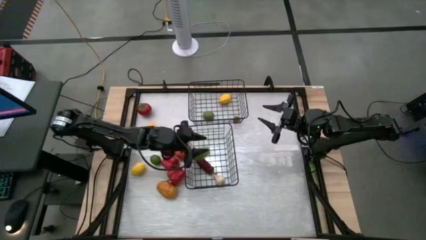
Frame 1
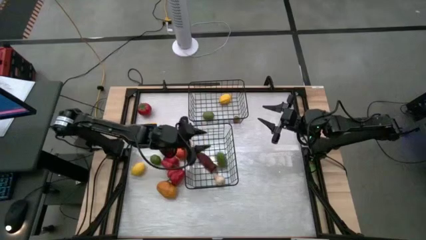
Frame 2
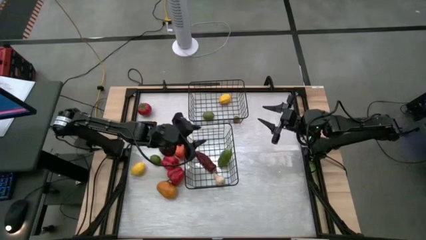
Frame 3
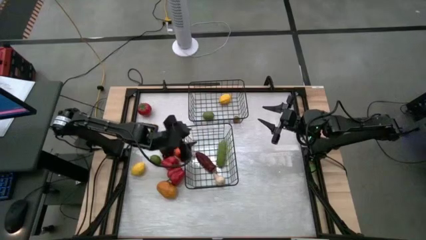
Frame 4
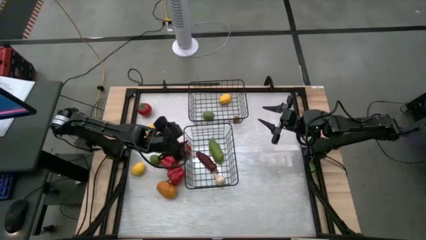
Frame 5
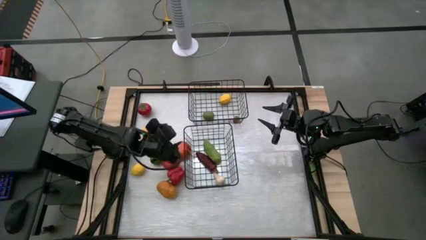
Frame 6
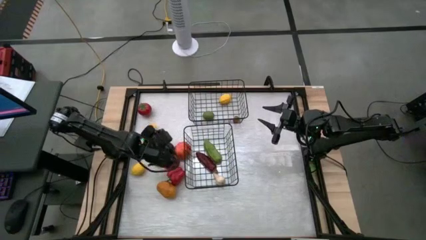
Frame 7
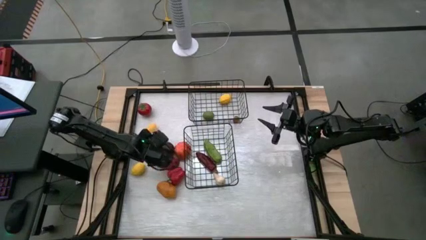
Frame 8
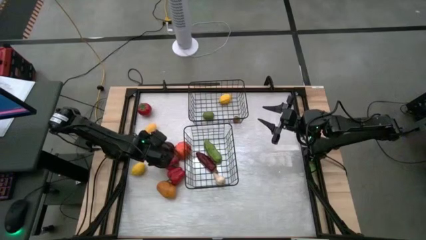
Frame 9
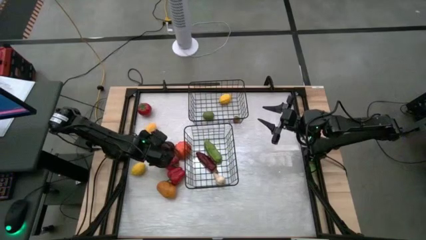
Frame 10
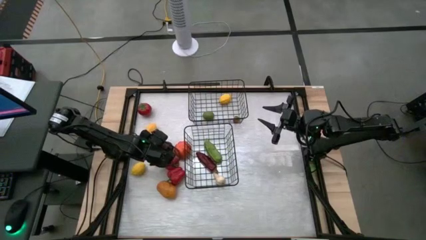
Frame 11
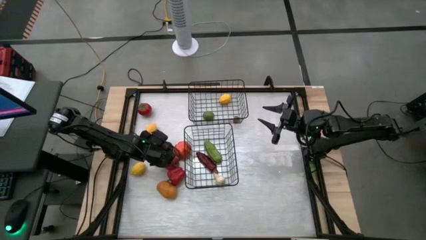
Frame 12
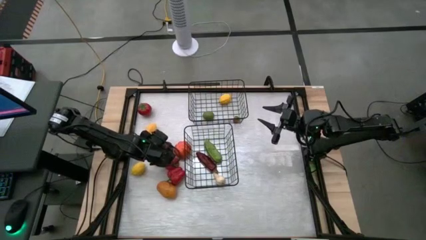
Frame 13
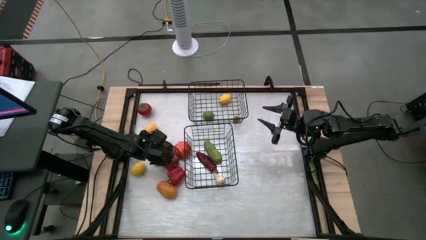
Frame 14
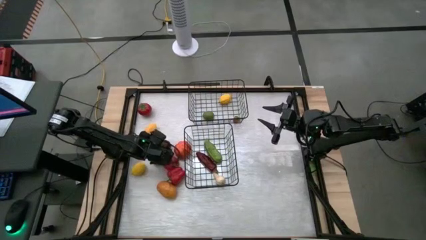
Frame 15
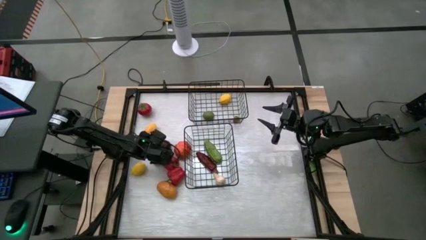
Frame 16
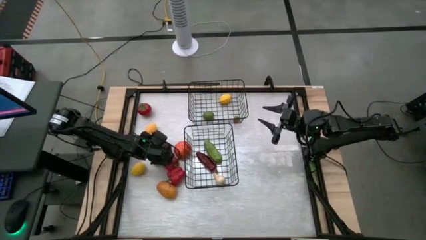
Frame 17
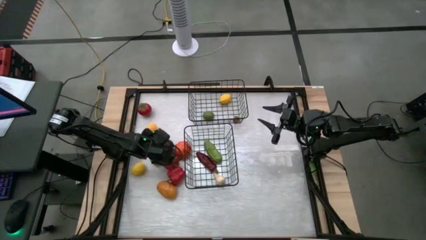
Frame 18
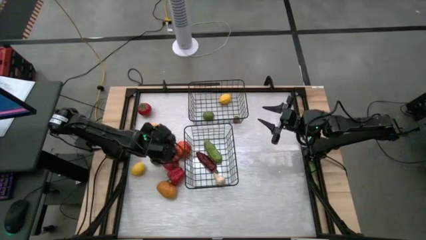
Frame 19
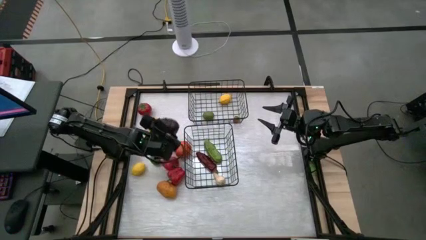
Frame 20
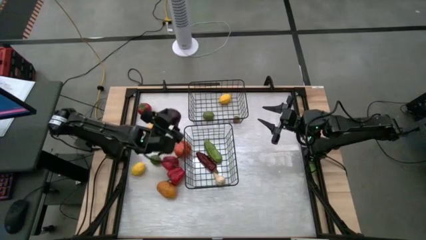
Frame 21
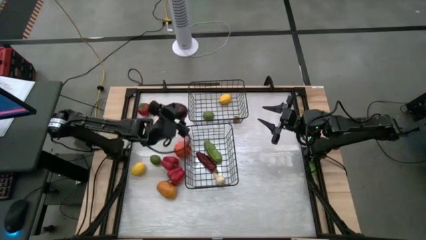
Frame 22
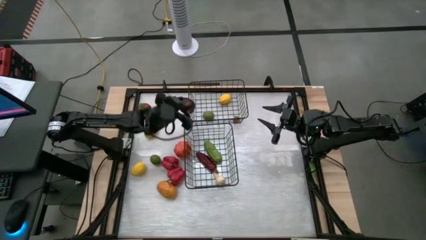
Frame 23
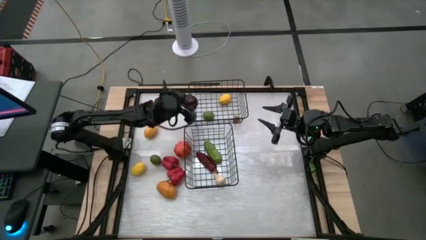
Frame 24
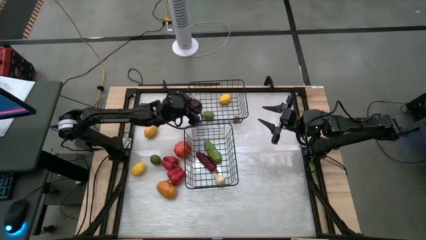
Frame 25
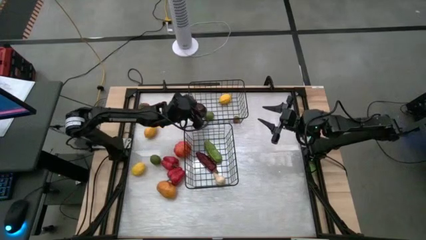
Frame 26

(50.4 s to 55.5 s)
Task: Sort produce into baskets
Put the red apple into the top wire basket

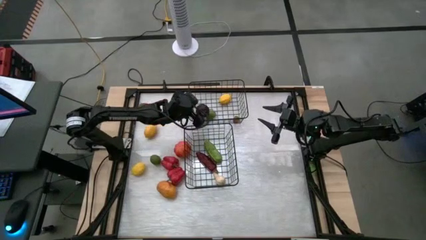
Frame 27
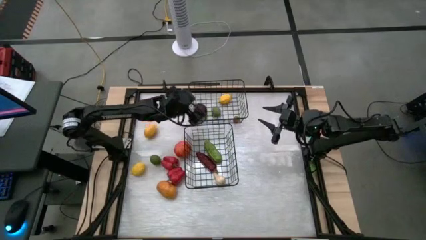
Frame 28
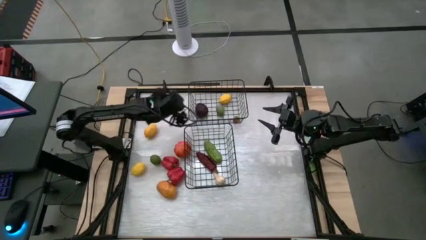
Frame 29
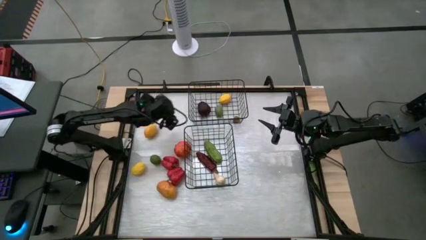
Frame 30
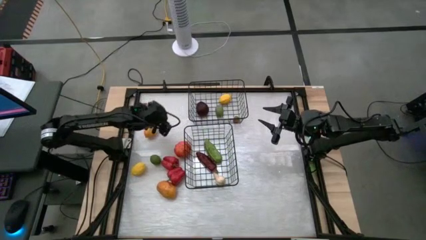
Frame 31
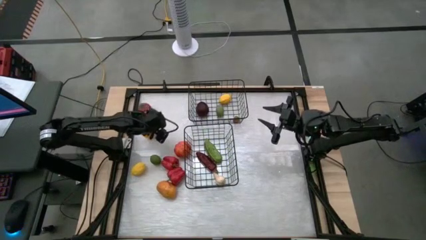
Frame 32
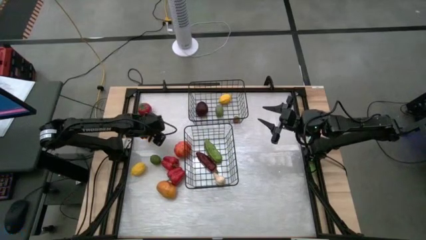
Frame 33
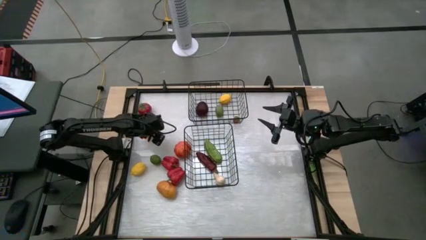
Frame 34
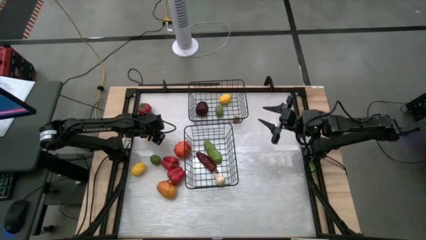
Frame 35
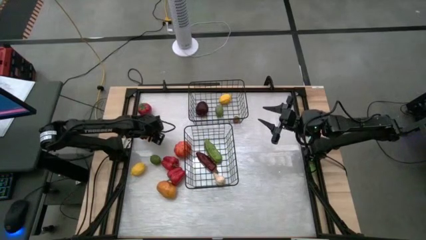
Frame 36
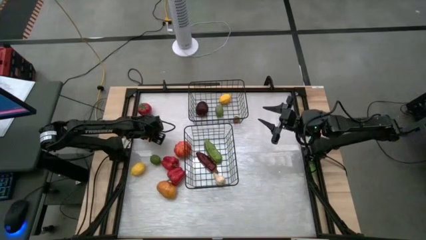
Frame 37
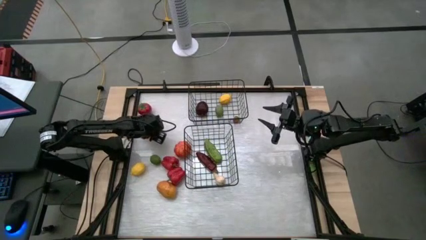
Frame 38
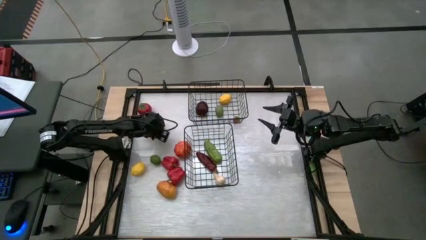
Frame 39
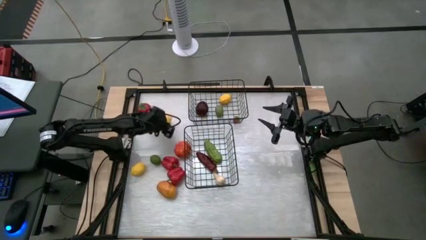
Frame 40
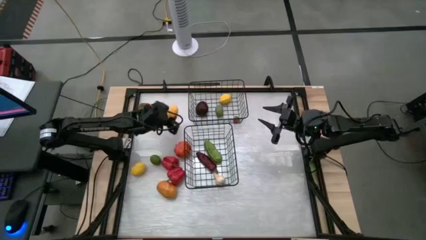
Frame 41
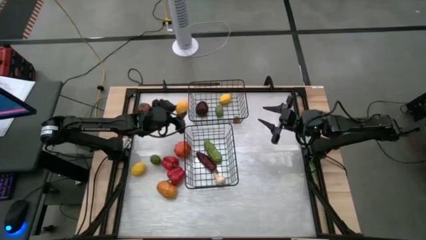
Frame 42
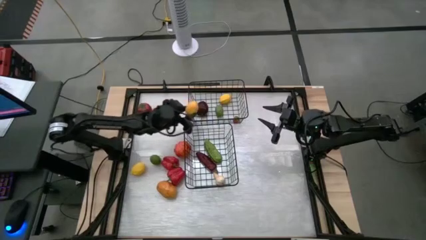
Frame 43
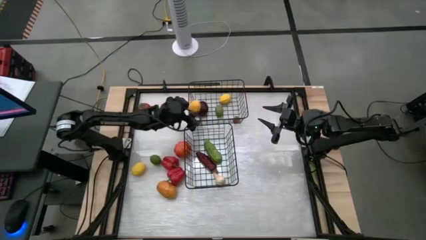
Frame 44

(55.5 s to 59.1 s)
Put the top yellow lemon into the top wire basket

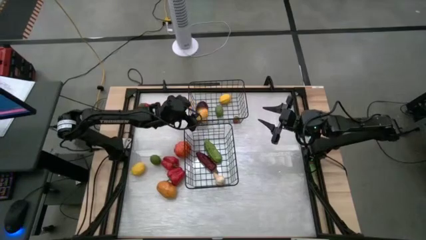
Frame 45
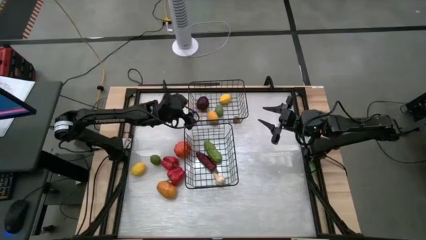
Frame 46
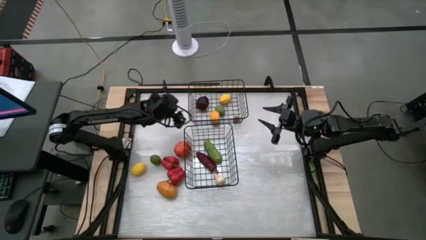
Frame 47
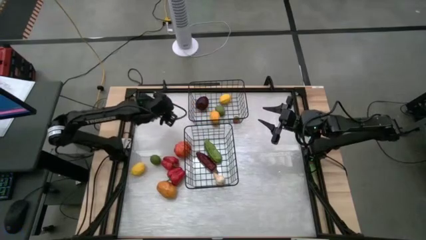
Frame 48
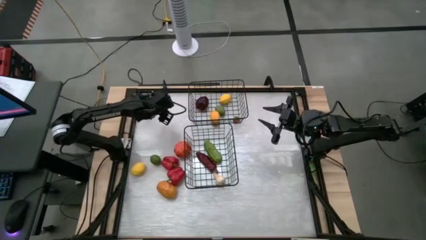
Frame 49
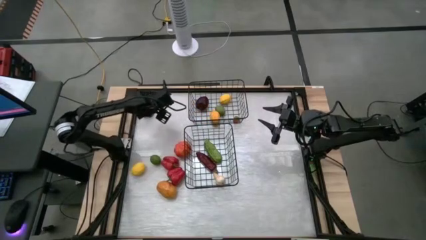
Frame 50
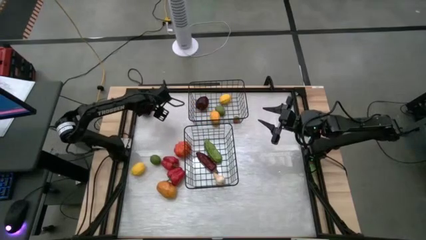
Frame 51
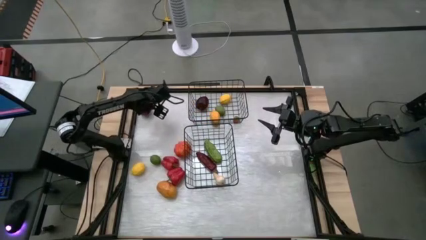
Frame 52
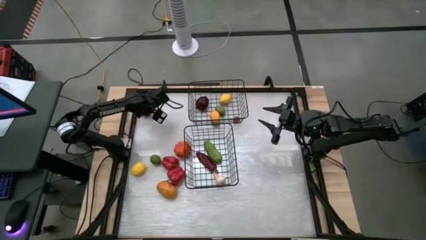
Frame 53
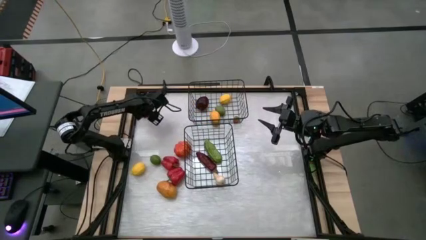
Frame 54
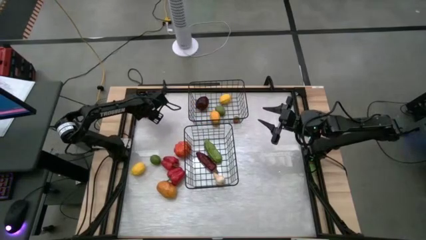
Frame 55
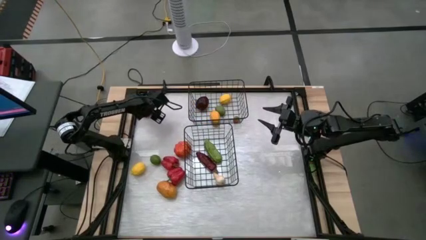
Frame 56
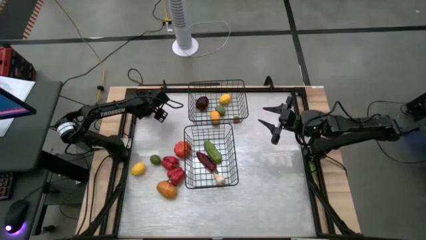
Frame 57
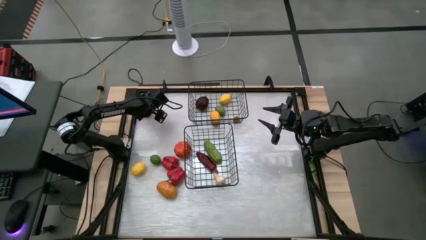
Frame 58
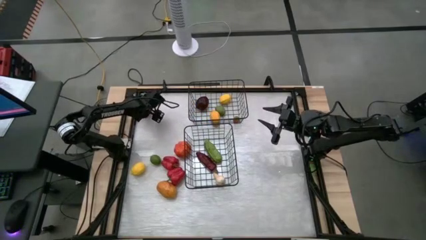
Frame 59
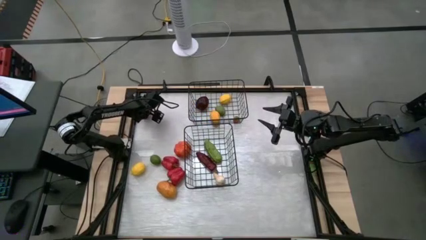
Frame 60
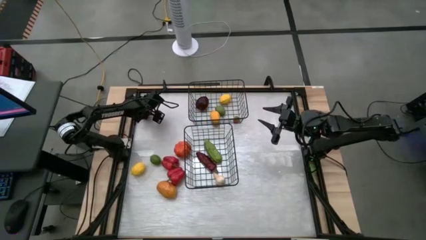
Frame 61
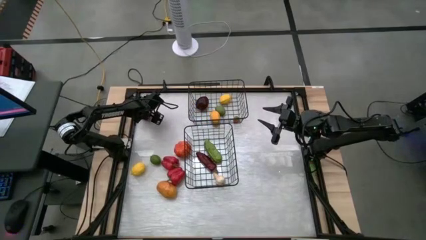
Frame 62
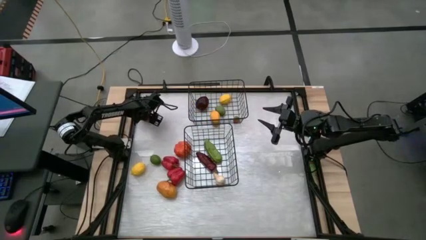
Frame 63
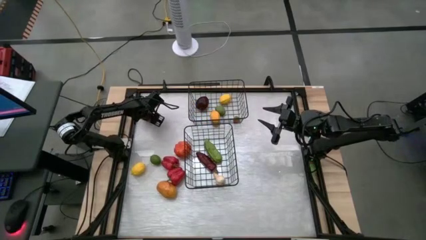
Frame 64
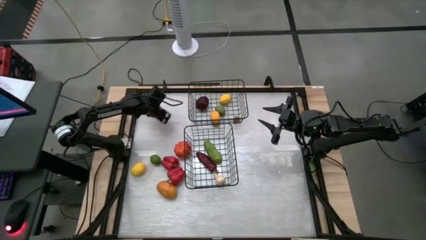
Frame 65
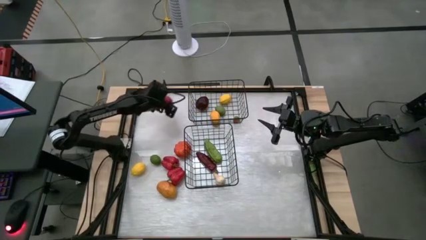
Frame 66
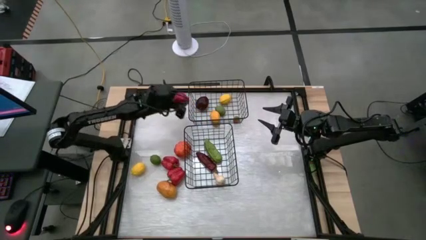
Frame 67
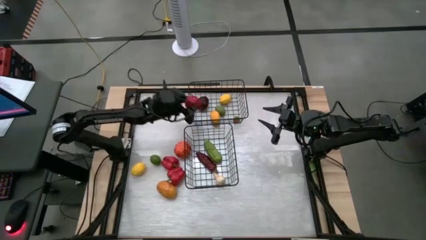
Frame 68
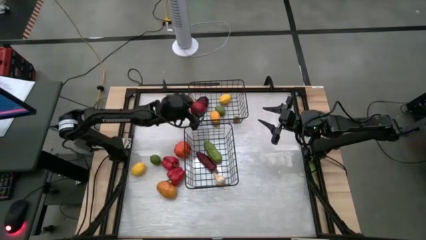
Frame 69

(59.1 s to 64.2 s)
Put the big red tomato into the top wire basket

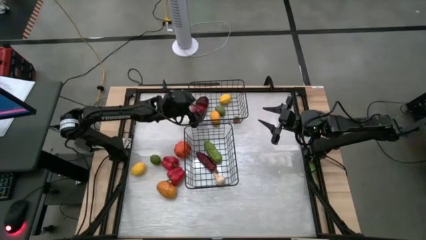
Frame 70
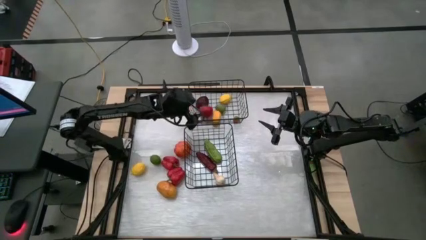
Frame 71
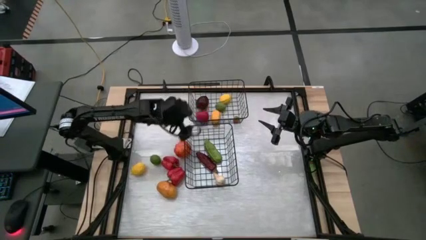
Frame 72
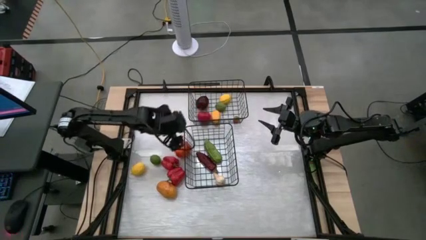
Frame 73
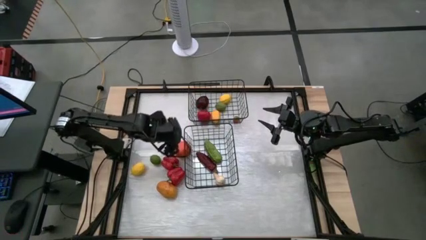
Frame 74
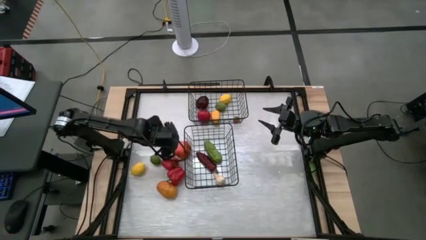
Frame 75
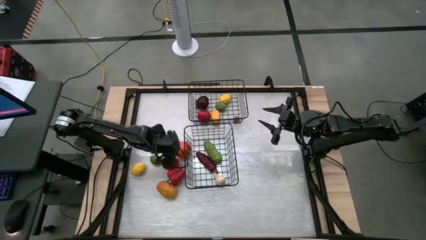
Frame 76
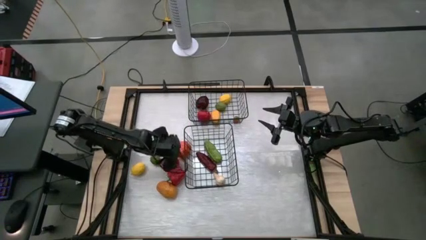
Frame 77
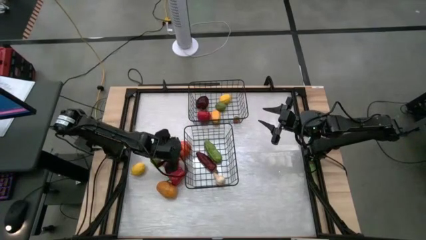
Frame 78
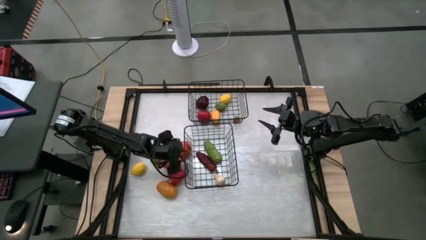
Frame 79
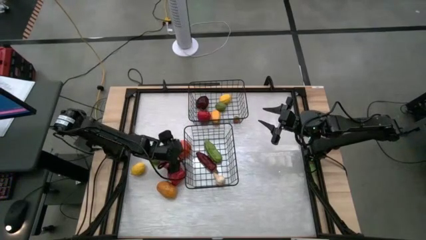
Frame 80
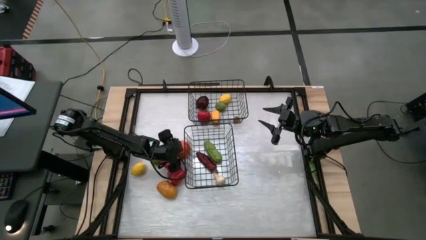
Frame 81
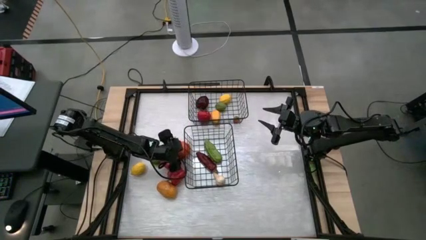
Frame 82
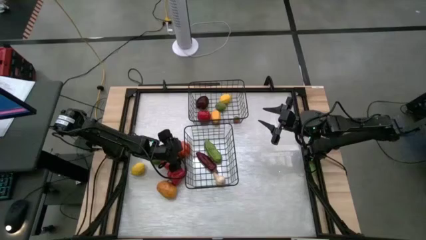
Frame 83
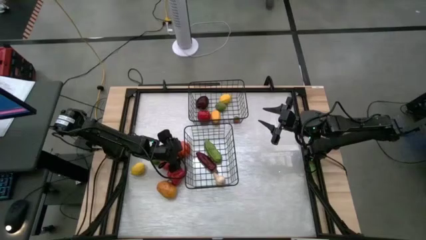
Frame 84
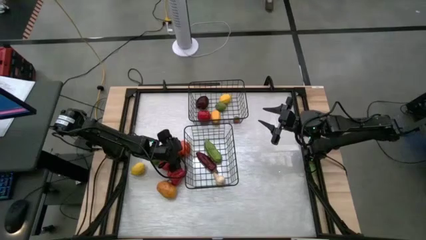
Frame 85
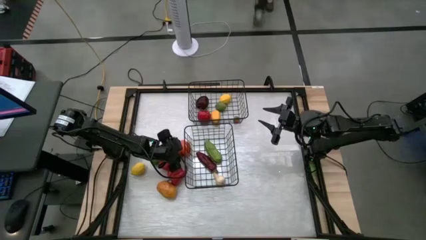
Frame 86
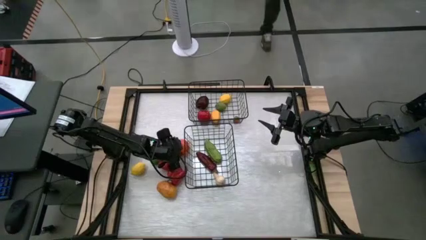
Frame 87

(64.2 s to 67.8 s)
Put the orange pumpkin into the bottom wire basket
